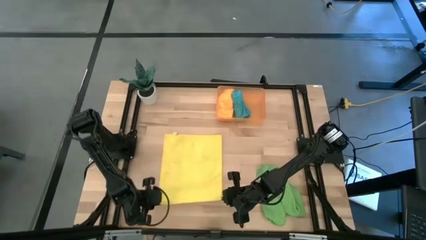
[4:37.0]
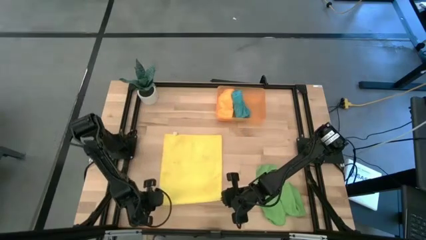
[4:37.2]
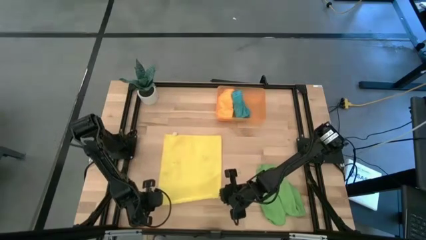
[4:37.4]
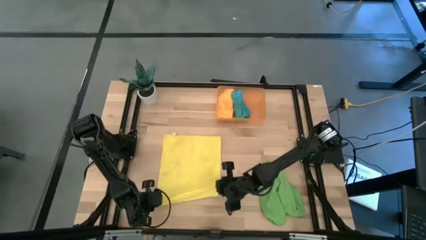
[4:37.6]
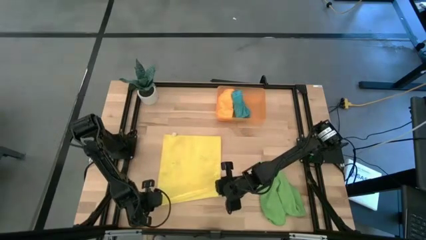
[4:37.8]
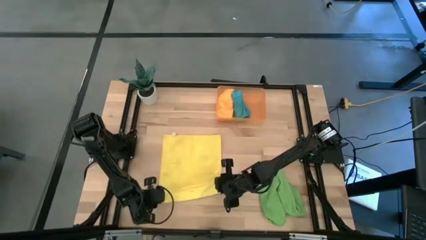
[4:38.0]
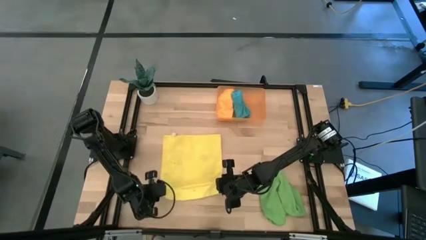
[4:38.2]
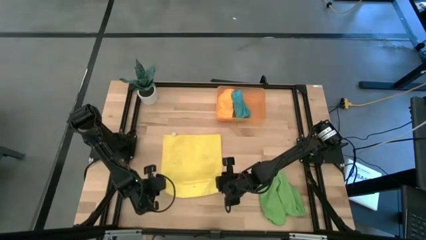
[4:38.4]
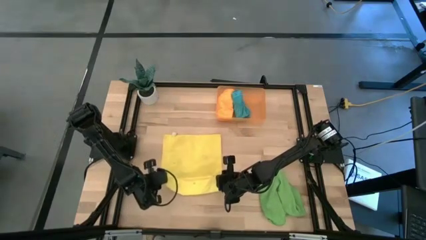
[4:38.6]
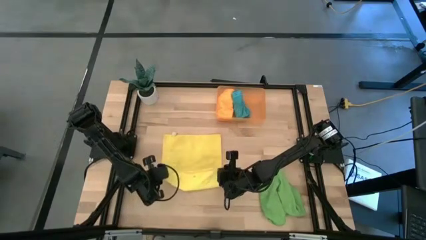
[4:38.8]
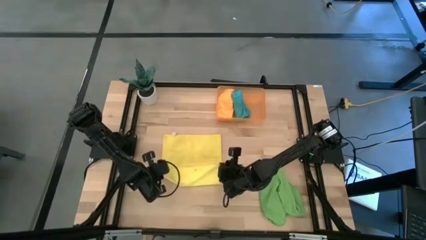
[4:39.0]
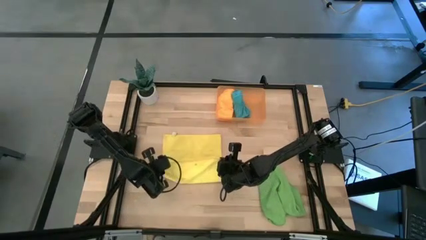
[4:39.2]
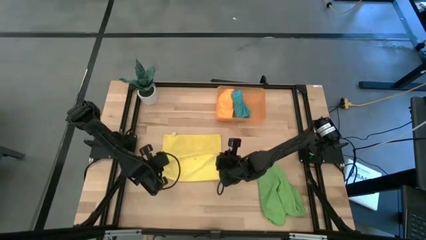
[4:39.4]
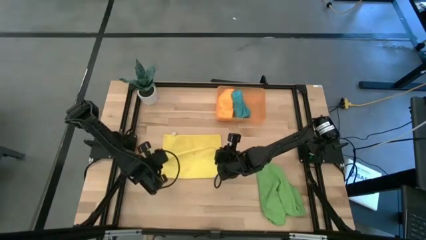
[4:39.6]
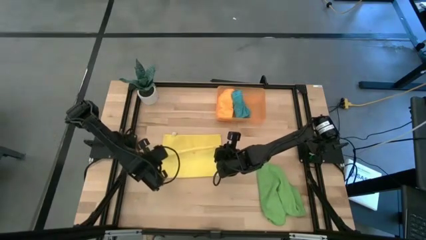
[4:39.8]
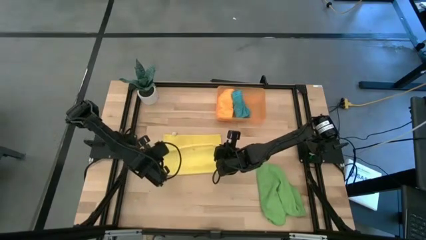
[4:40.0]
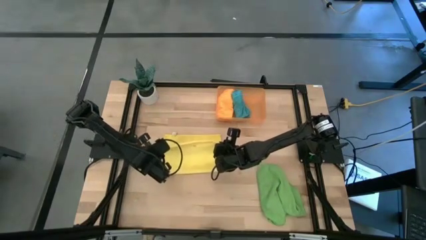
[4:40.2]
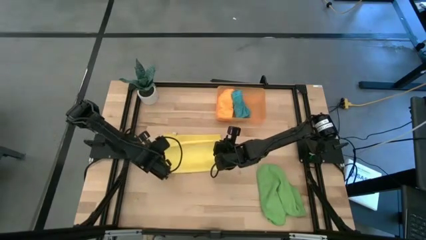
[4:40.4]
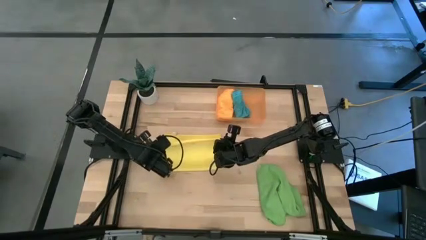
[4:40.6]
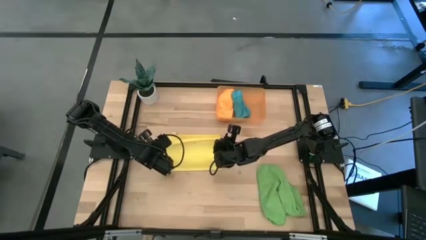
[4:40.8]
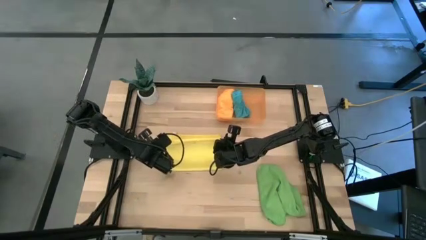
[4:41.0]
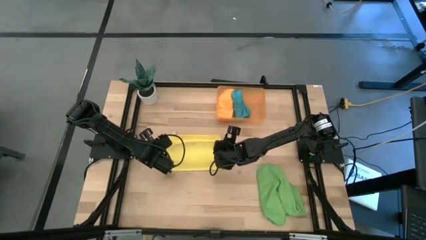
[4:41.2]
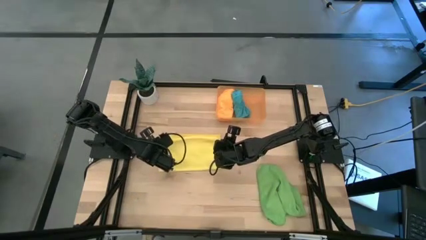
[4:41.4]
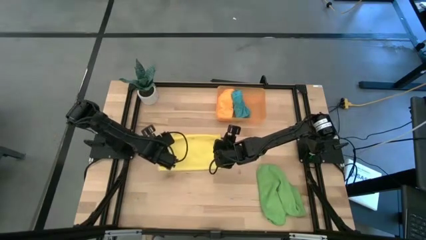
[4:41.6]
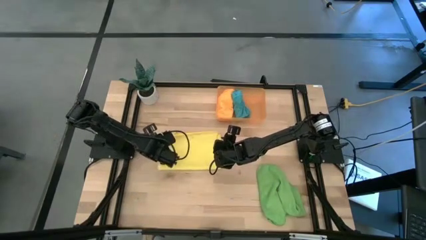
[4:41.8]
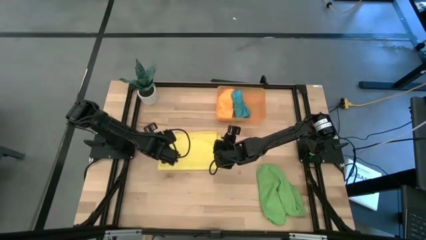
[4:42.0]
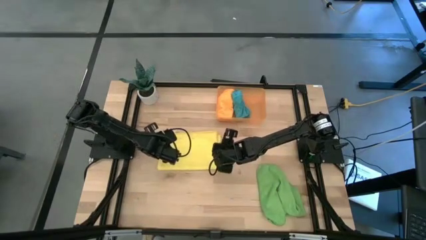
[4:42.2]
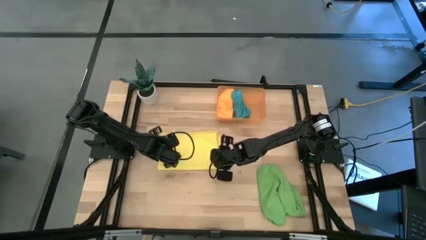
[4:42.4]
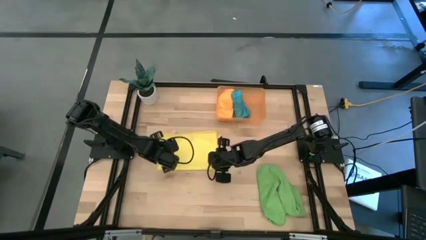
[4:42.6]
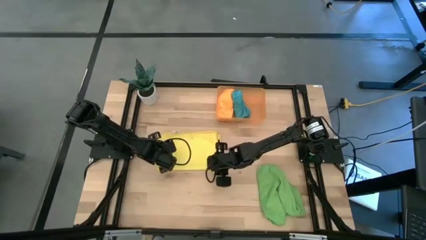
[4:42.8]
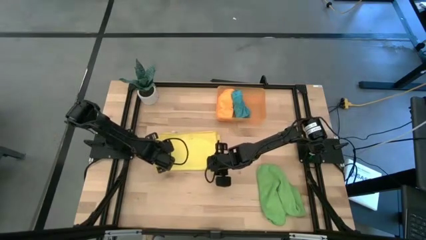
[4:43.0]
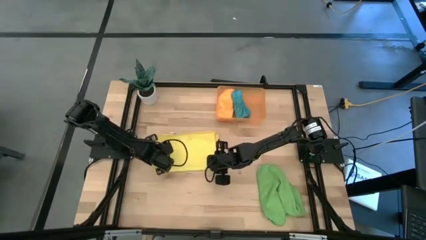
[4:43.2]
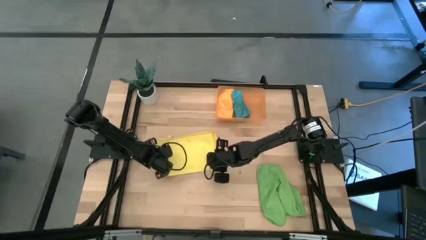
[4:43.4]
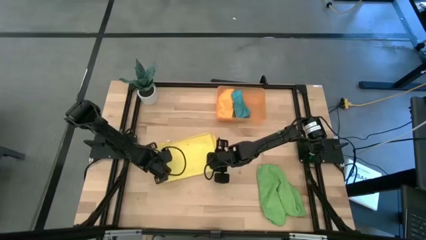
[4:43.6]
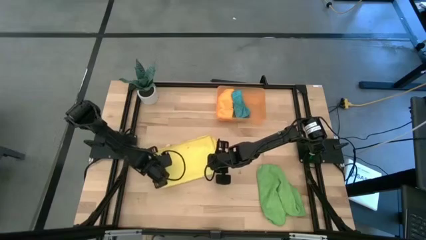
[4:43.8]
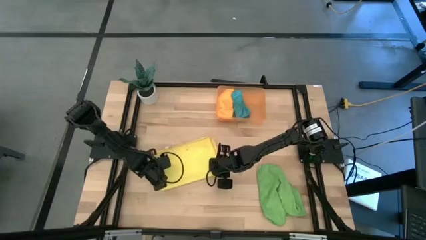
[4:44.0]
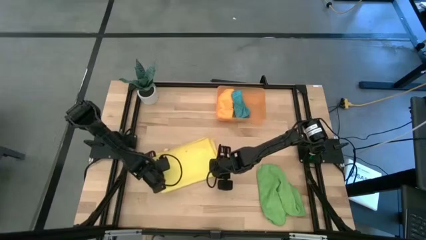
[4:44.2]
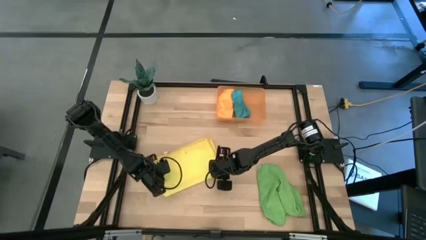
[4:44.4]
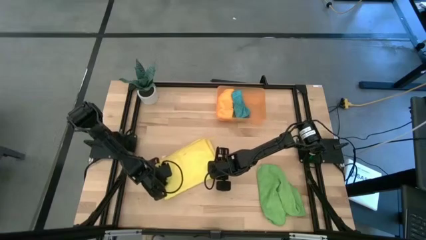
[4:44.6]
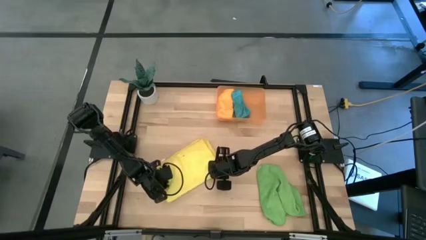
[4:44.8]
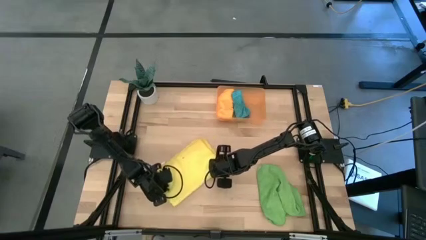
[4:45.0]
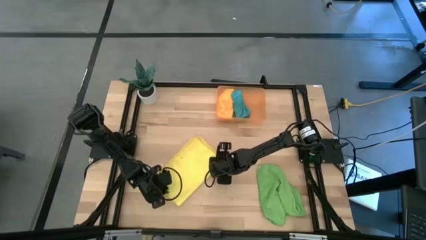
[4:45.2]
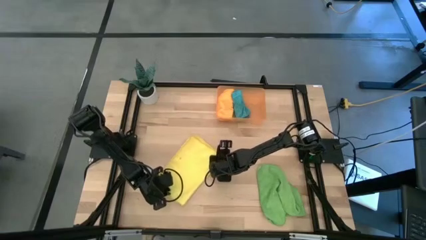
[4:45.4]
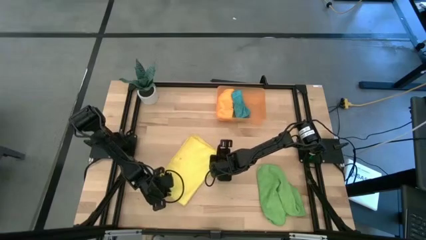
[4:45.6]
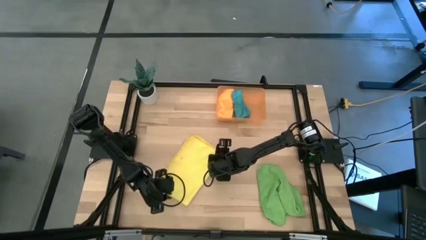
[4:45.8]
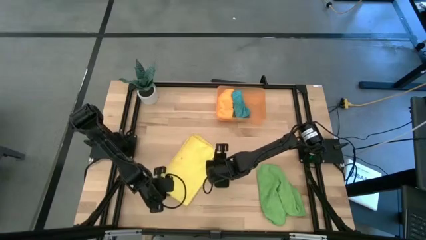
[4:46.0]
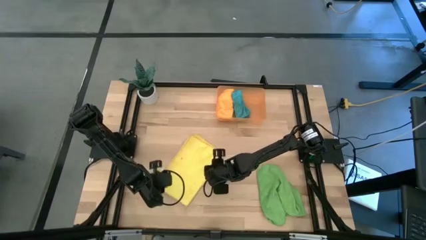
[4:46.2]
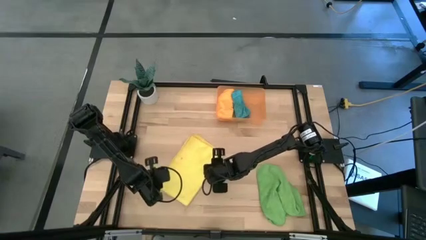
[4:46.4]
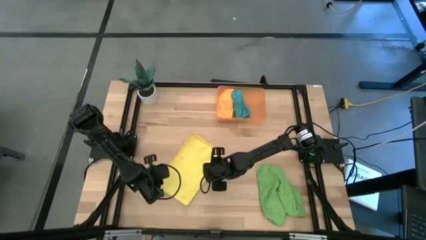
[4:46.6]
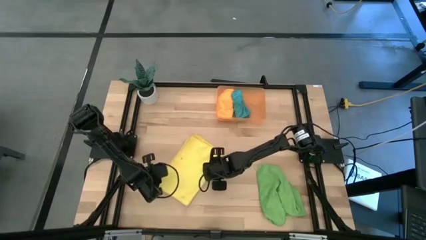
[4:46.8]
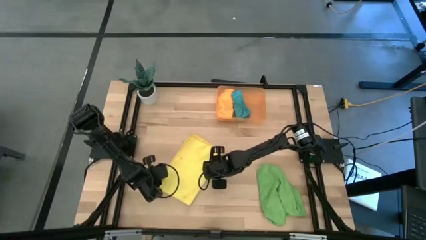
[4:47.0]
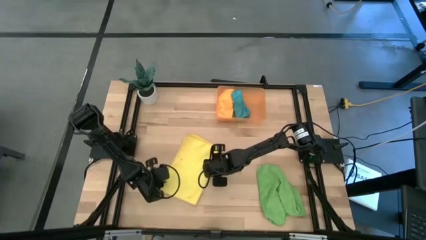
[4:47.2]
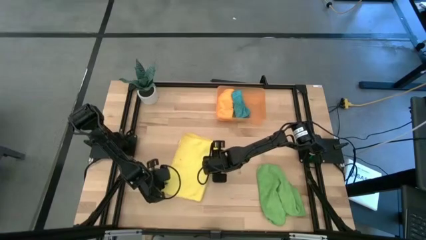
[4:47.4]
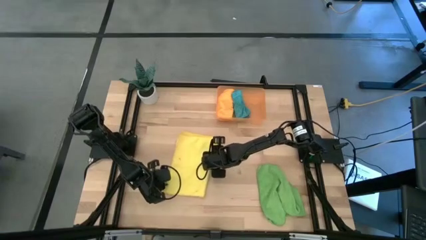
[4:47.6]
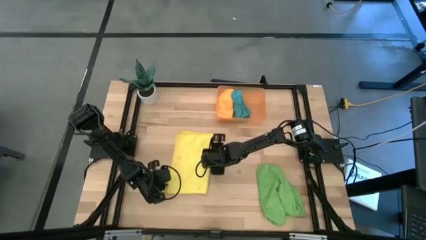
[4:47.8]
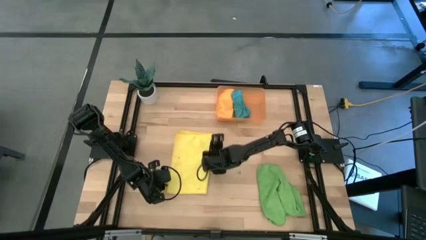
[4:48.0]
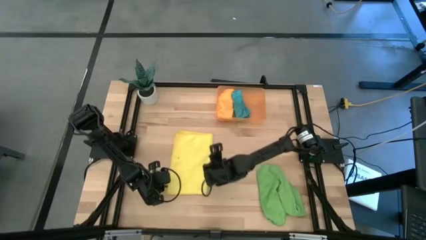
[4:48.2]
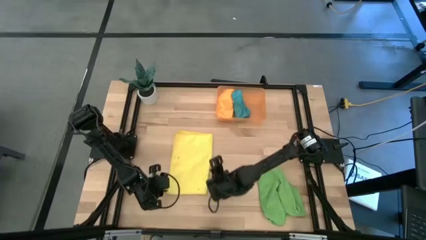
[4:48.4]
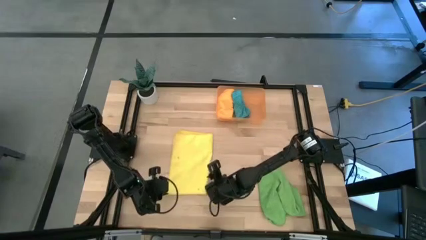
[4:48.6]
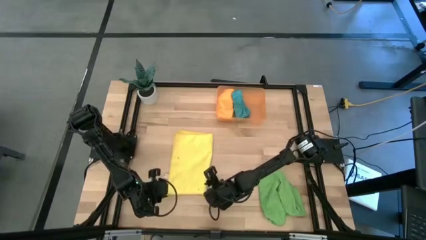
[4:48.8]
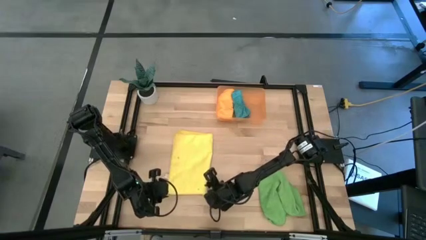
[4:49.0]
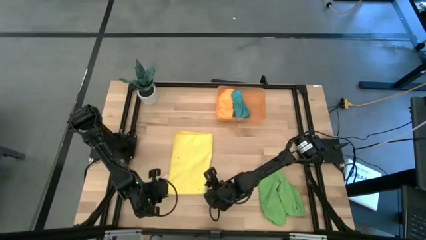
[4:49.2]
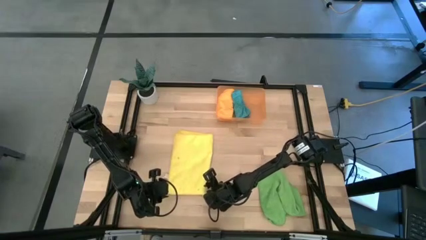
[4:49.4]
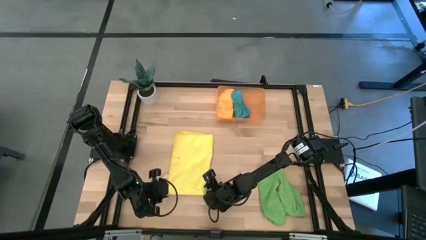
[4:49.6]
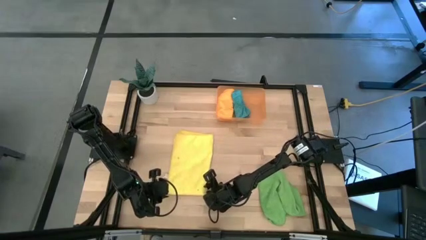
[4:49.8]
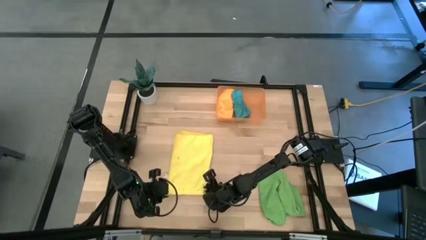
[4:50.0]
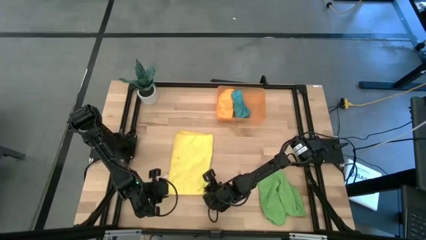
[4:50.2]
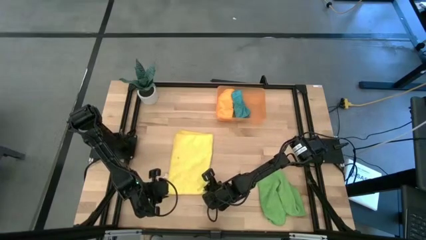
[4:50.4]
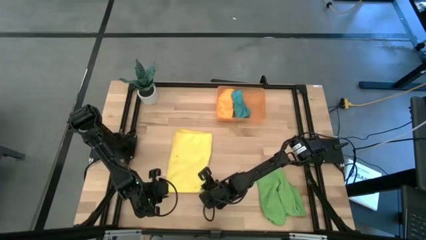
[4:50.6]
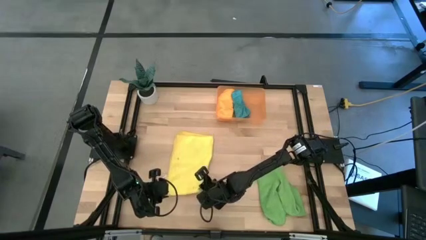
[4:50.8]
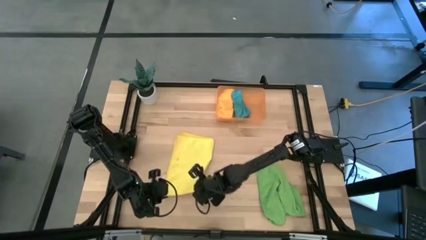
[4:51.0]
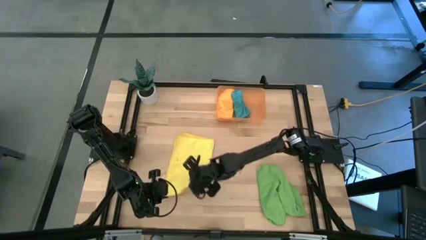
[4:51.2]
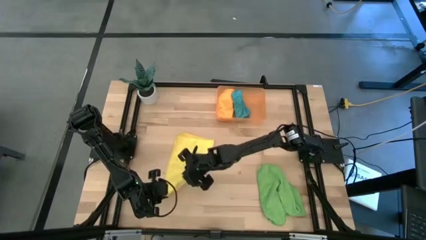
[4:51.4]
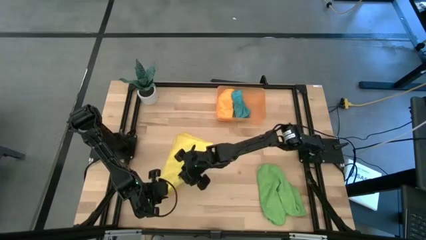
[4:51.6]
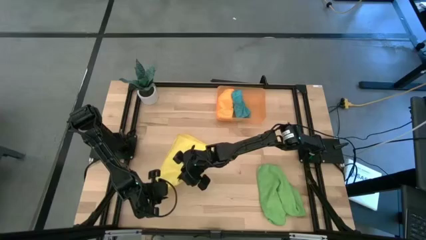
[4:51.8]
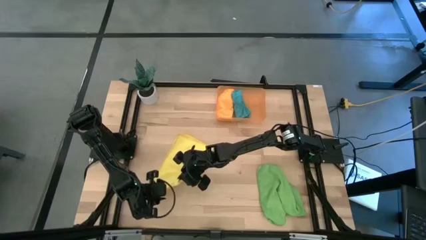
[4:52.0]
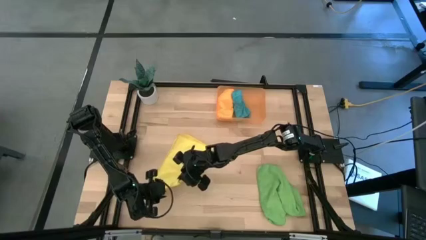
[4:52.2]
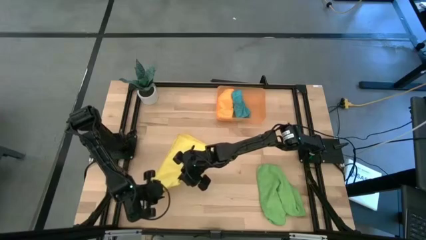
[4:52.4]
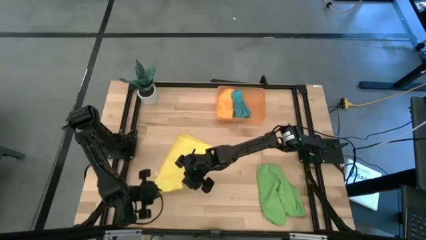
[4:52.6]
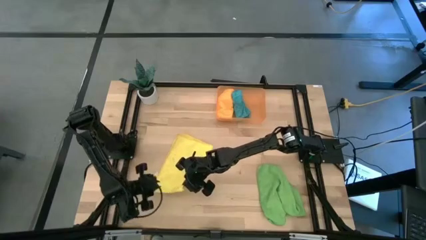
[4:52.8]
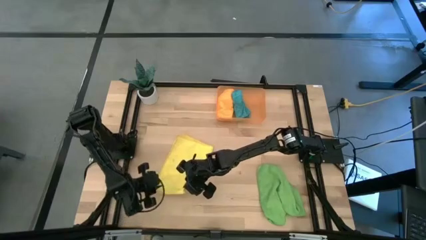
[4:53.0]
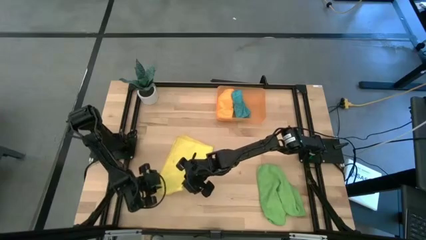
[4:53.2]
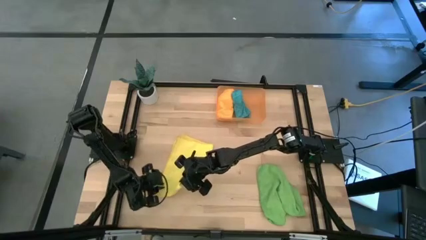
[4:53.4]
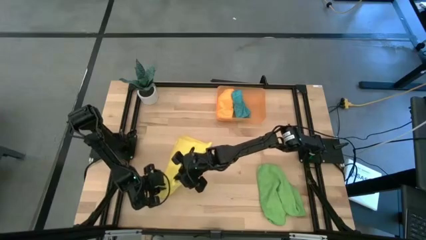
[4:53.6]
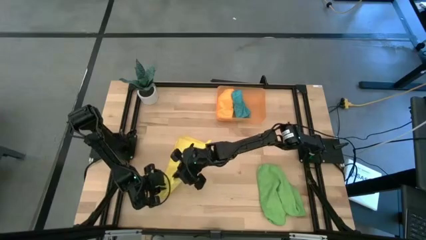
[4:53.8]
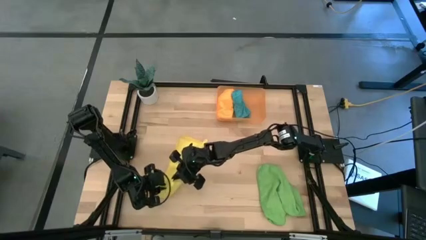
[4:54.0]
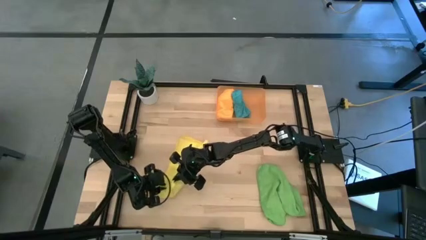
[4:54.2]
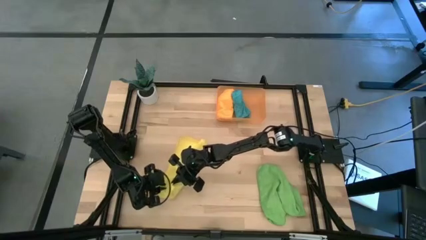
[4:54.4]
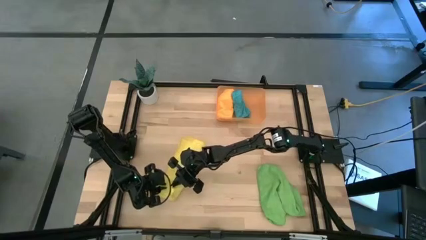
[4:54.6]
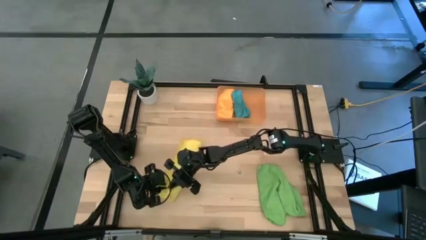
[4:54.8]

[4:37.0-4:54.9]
Task: Roll microfiber towels into tight, uniform cylinder then place into a basket
Roll the yellow microfiber towel
